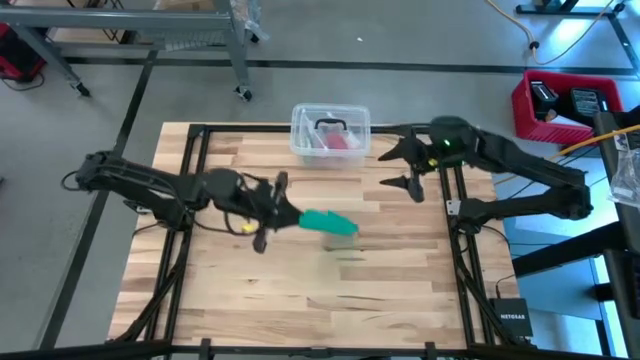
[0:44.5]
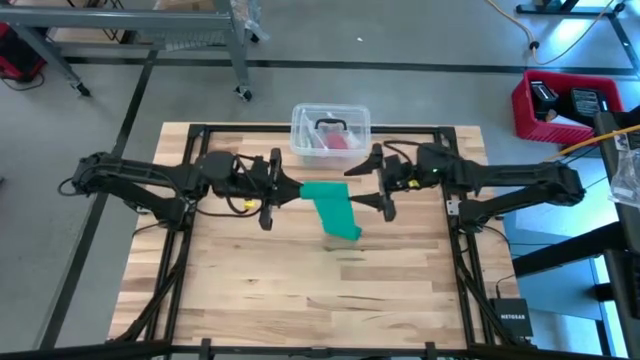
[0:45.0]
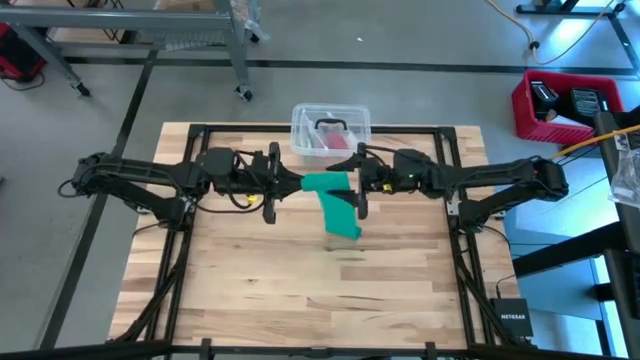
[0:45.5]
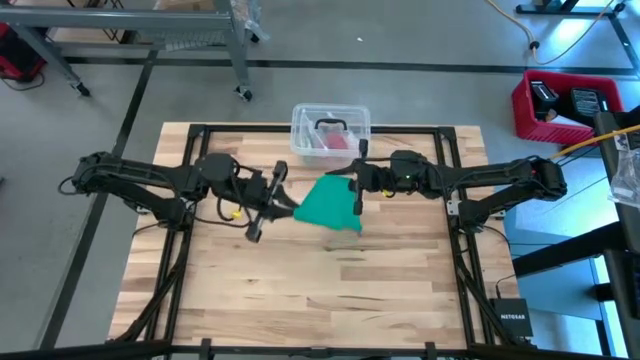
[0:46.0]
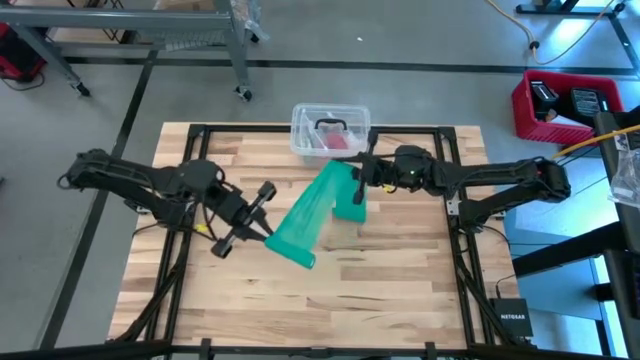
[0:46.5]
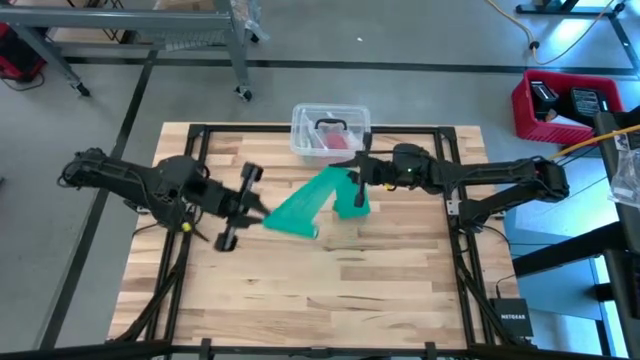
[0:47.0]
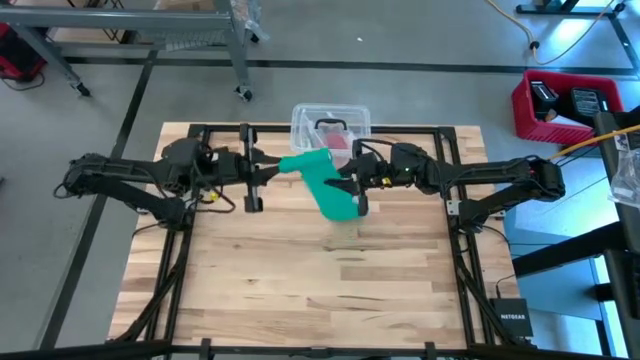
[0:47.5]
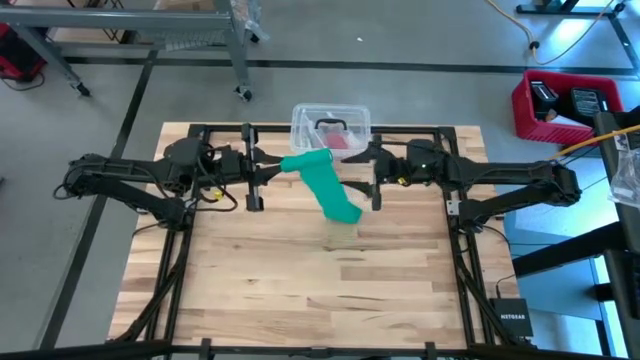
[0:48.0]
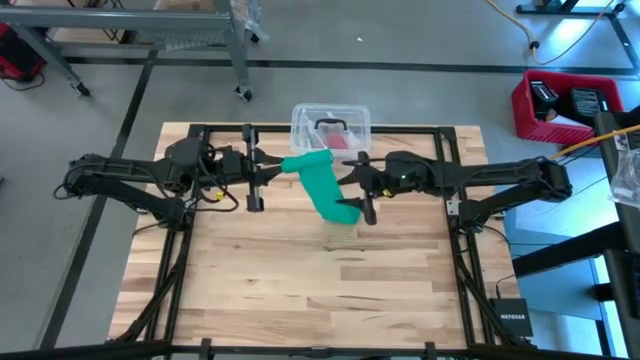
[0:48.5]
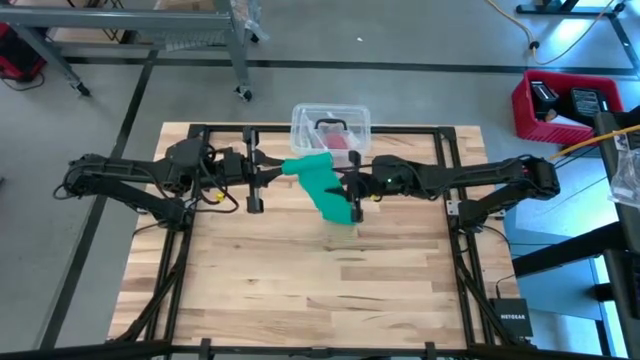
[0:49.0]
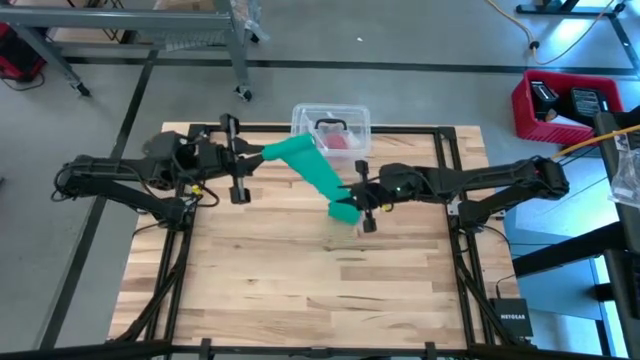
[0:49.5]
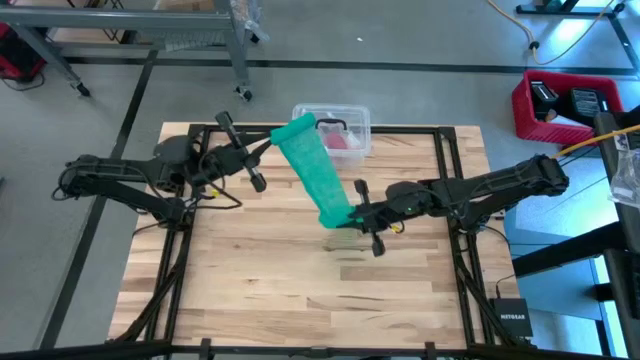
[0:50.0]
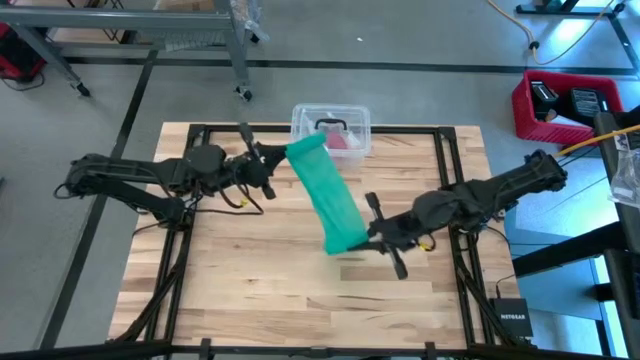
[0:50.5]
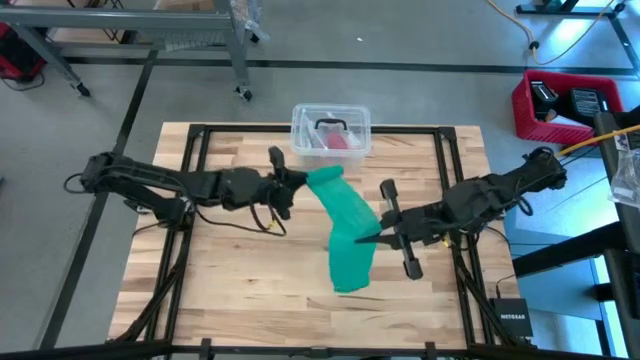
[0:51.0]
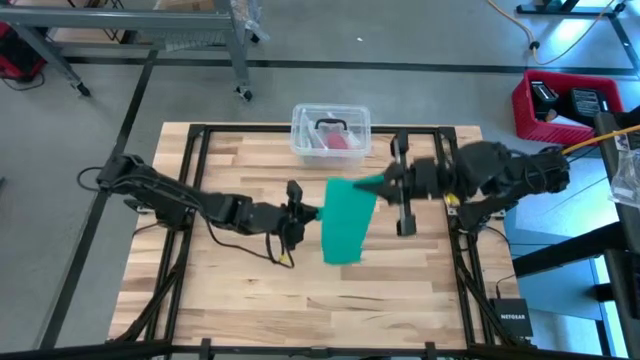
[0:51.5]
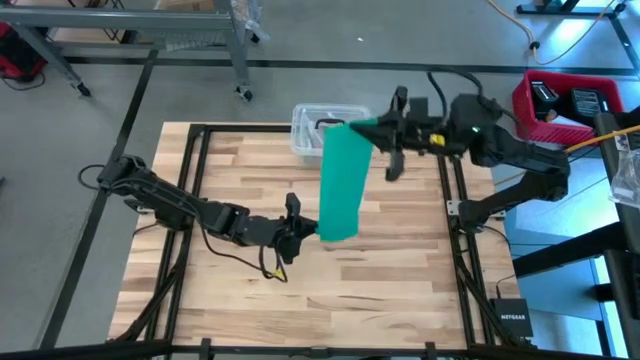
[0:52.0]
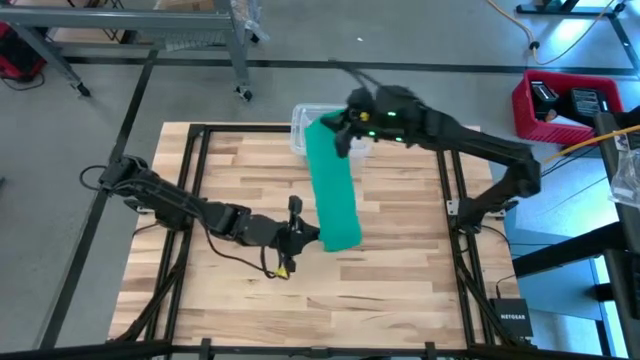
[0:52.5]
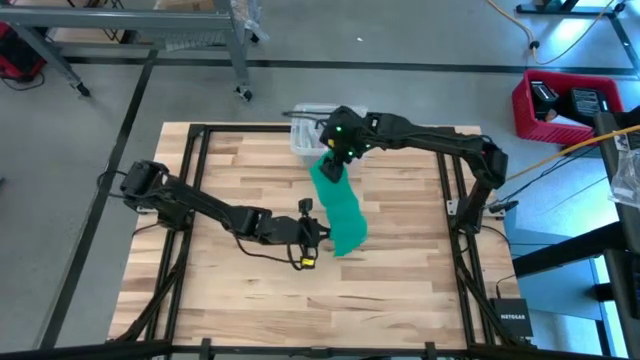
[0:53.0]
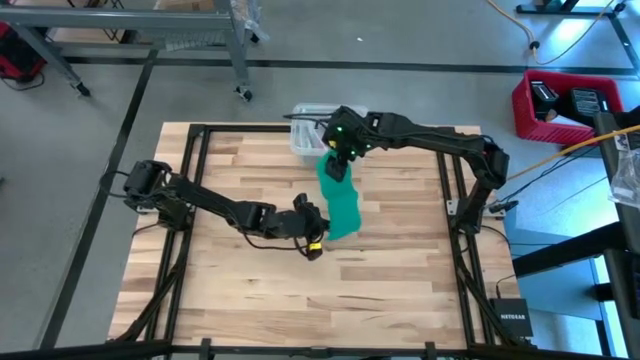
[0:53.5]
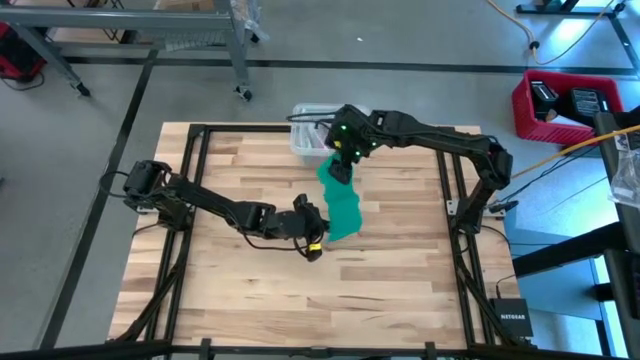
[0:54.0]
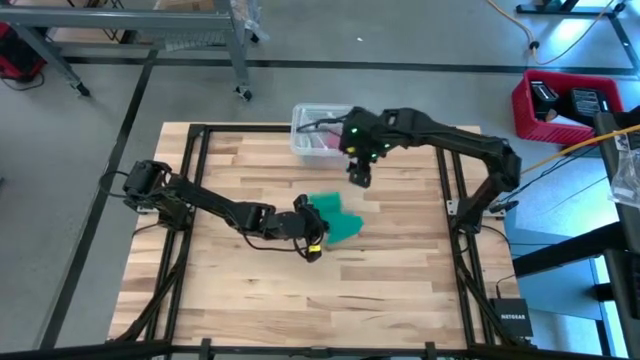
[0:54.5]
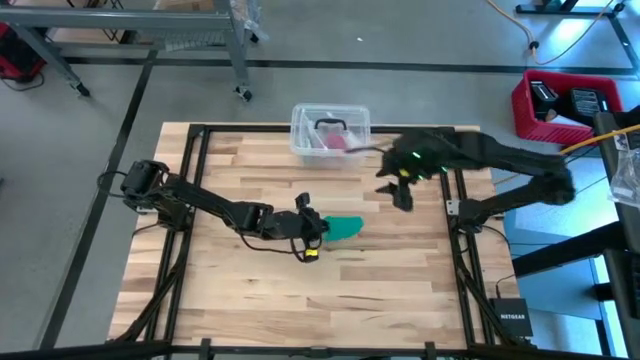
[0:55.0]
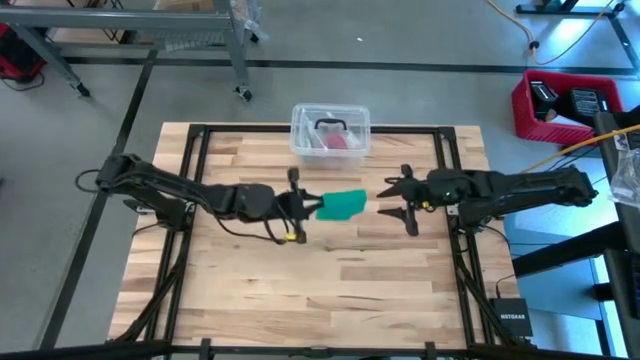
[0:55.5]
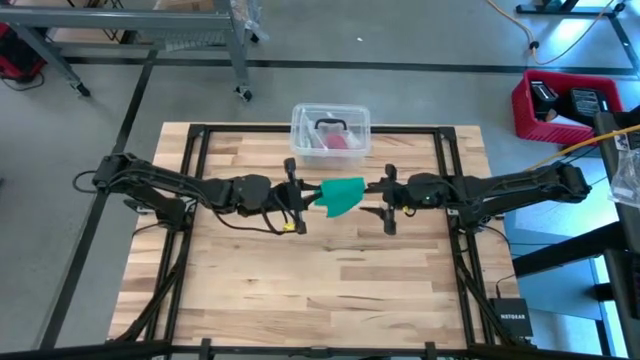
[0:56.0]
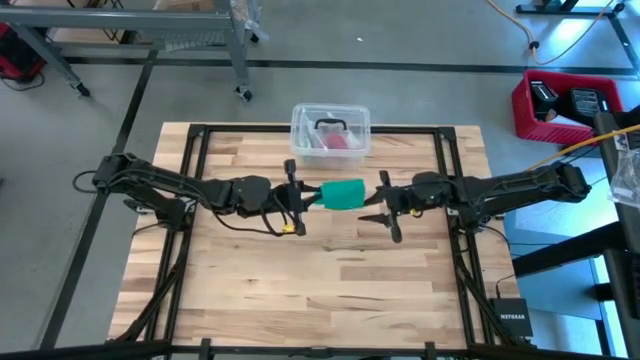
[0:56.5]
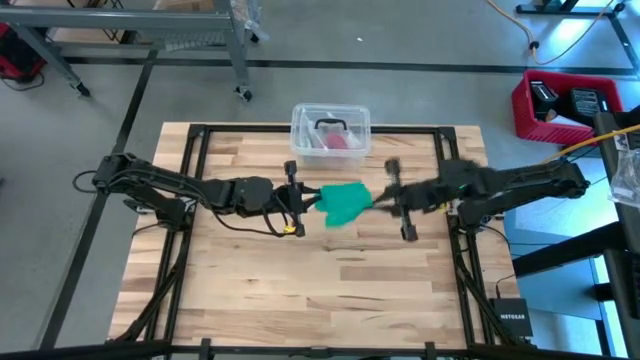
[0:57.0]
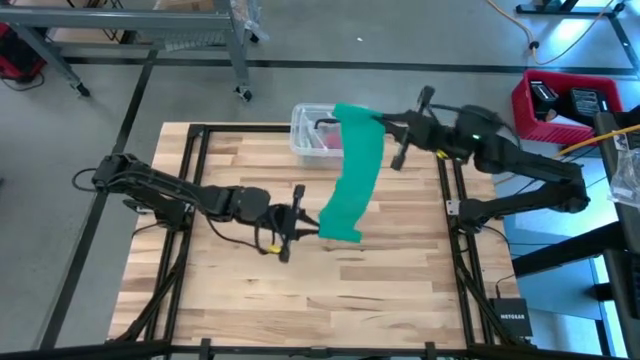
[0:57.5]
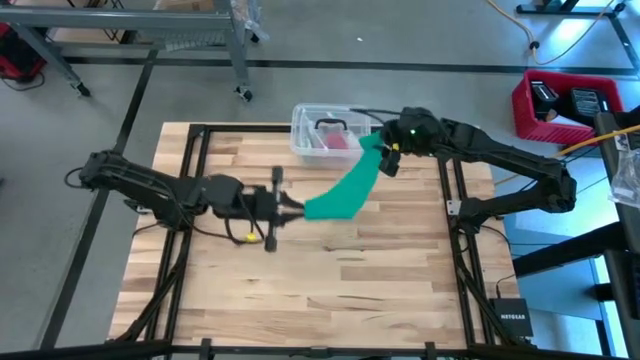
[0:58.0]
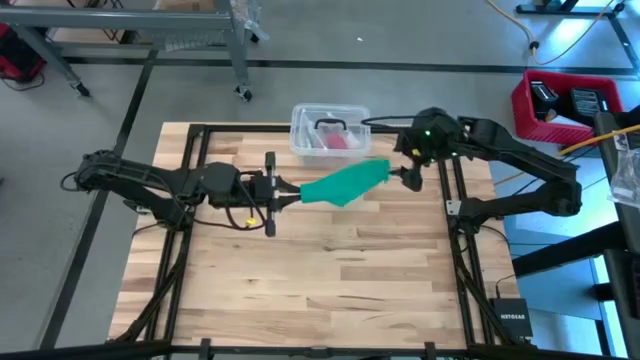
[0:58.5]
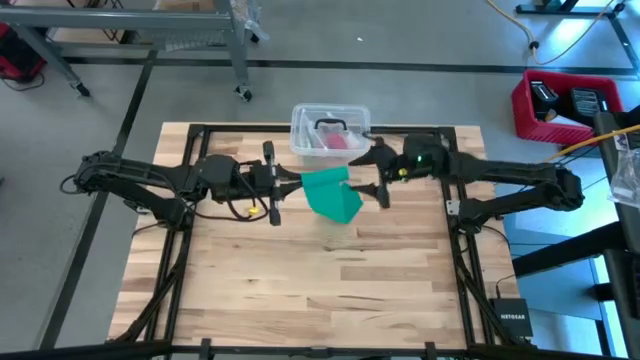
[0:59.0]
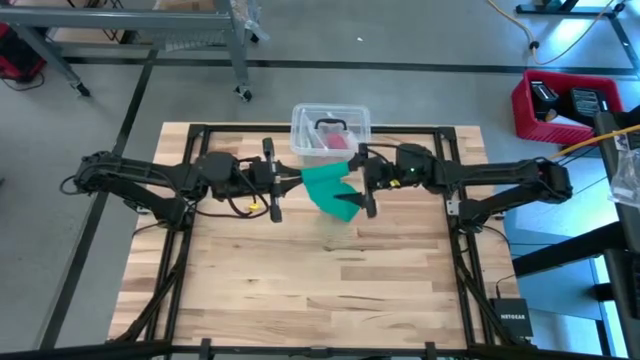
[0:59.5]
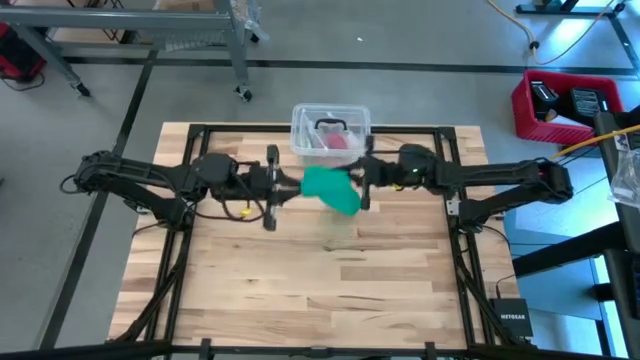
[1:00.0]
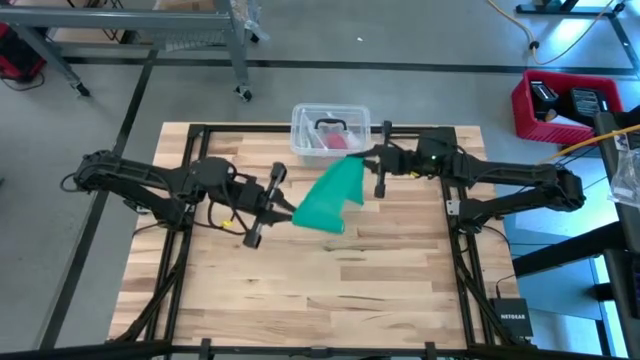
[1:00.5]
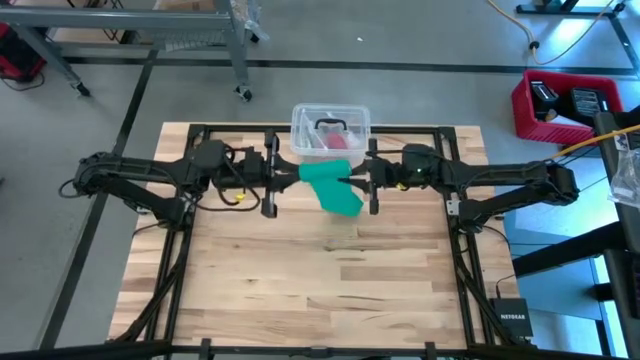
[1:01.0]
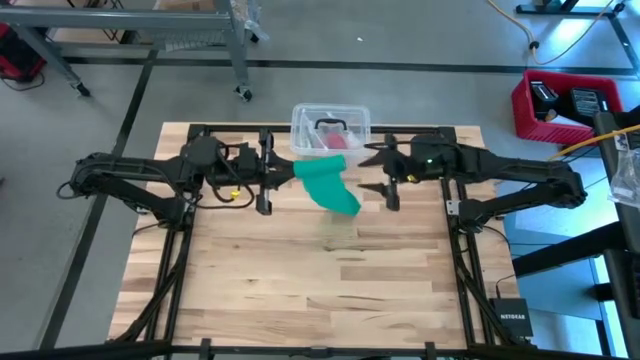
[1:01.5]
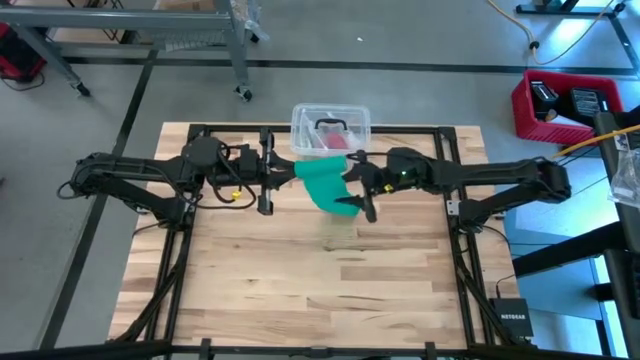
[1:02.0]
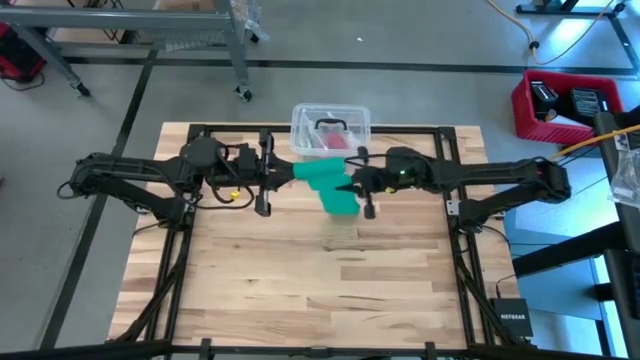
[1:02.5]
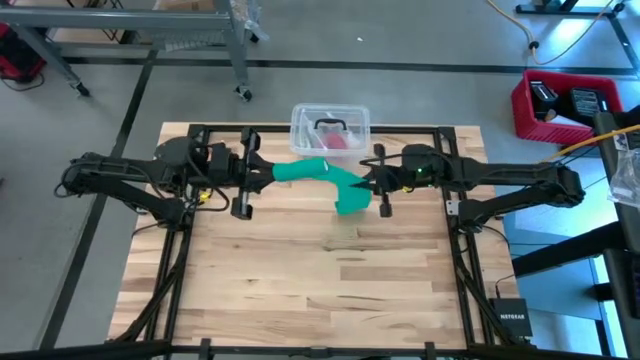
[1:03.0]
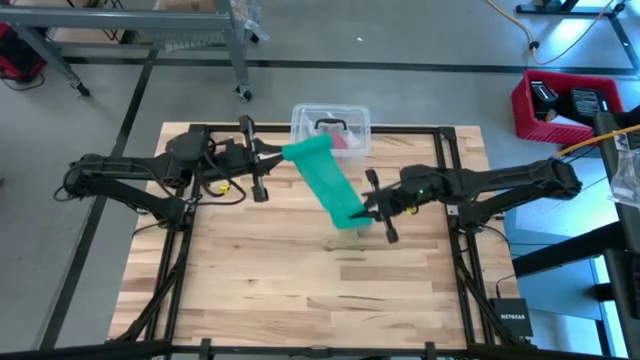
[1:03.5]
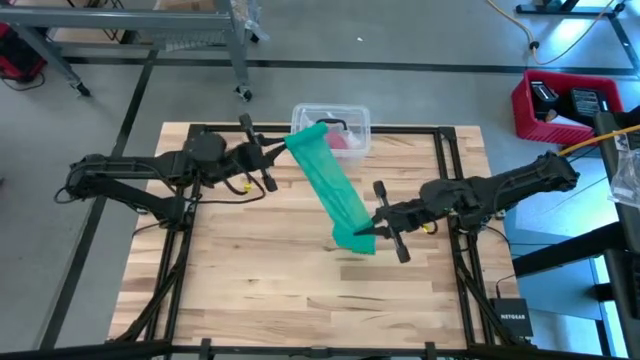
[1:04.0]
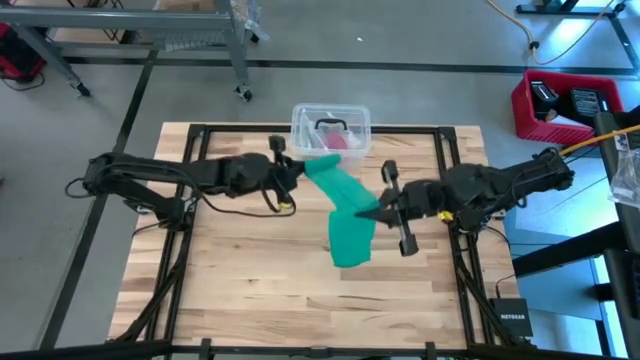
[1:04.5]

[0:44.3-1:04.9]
Task: Roll bandage
Roll the green bandage
